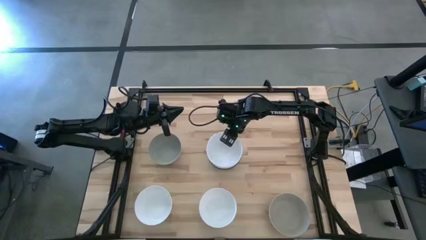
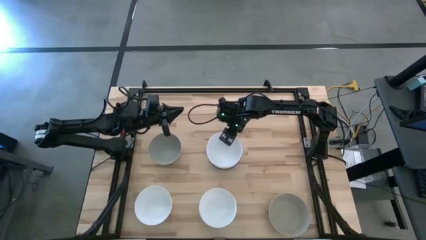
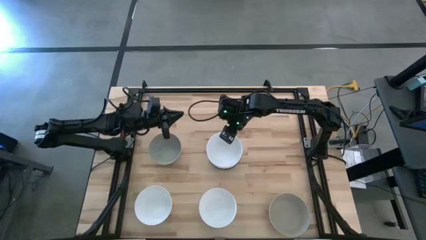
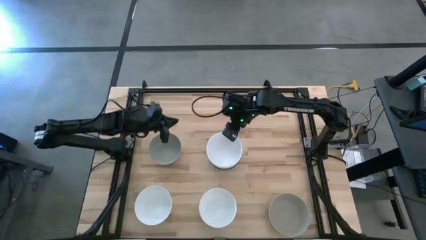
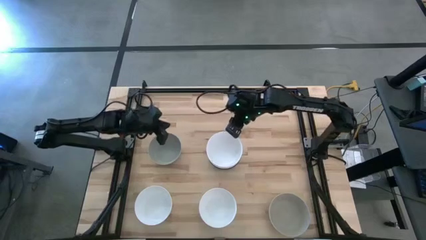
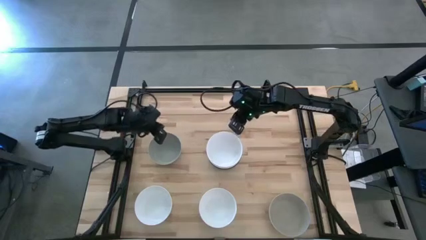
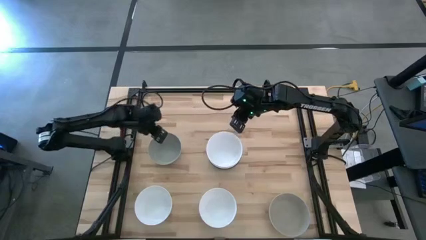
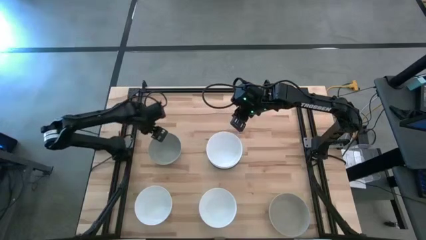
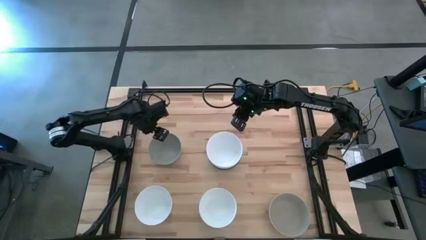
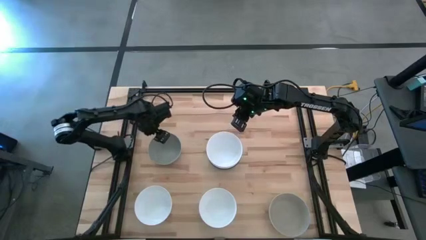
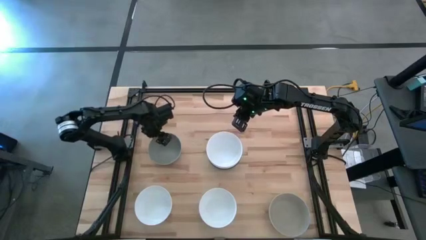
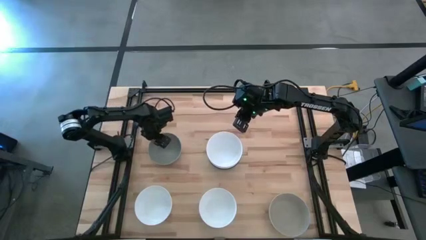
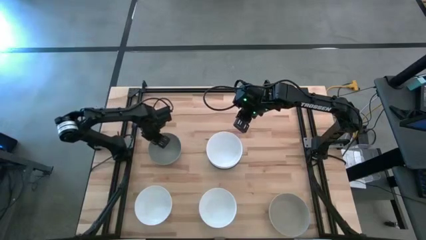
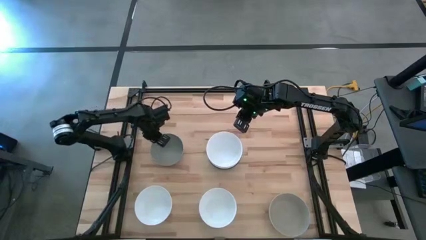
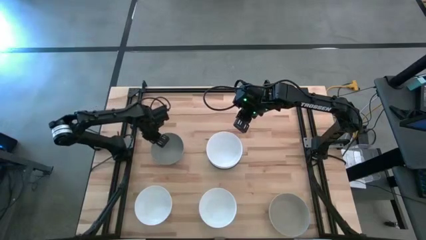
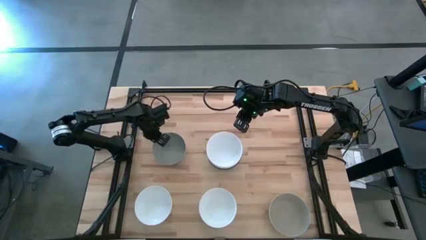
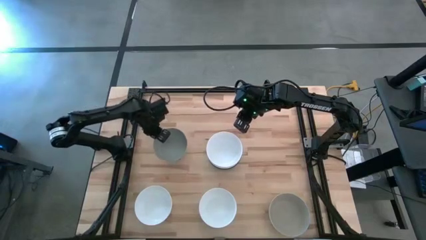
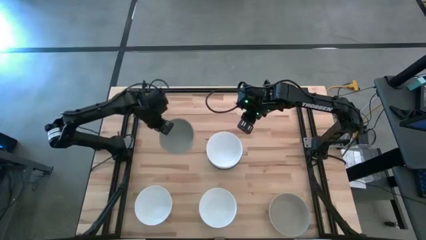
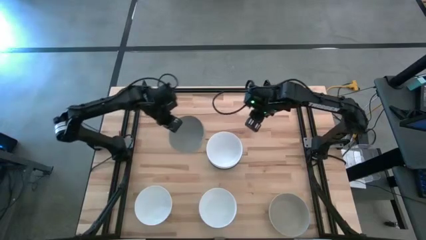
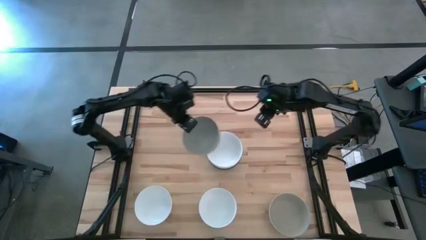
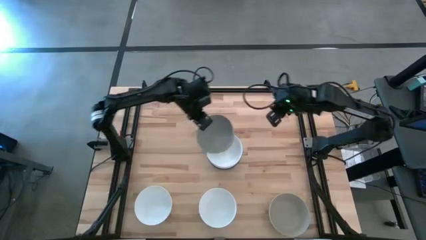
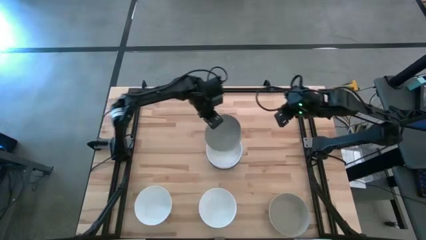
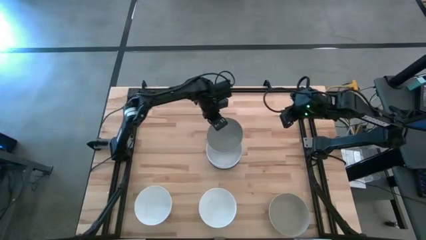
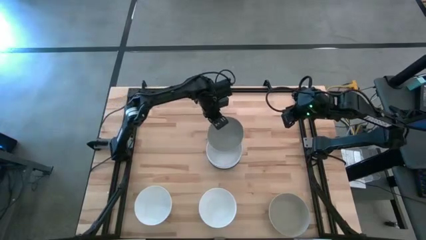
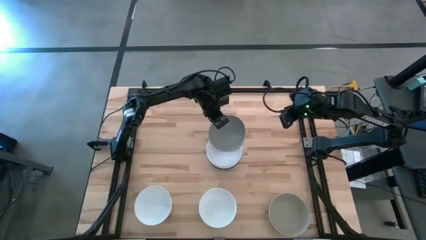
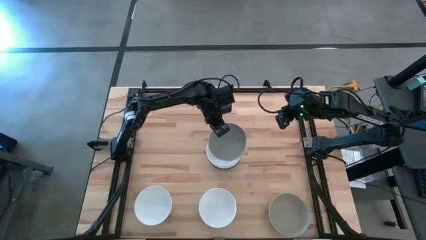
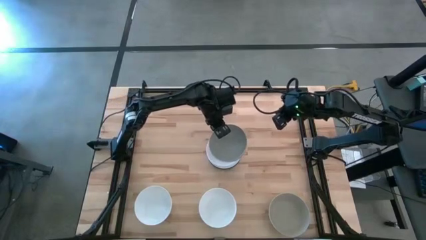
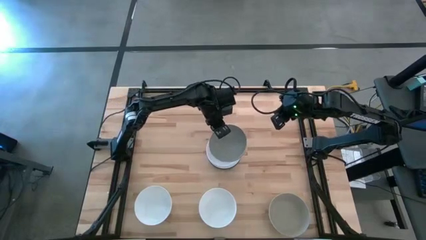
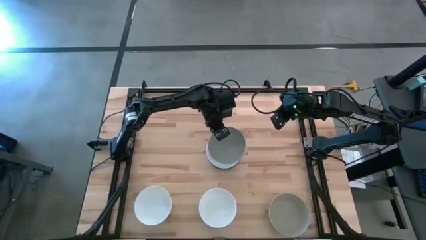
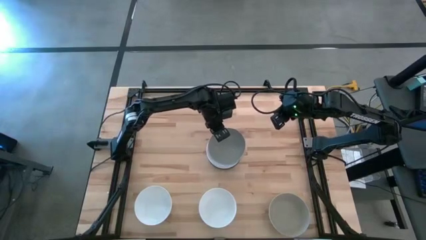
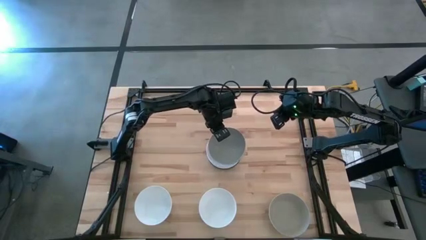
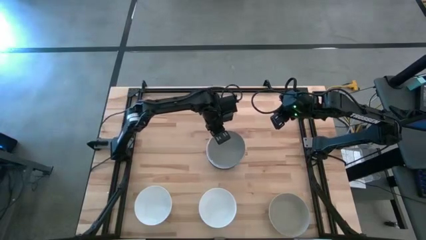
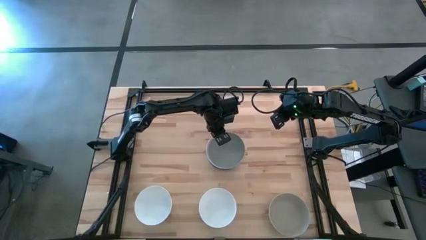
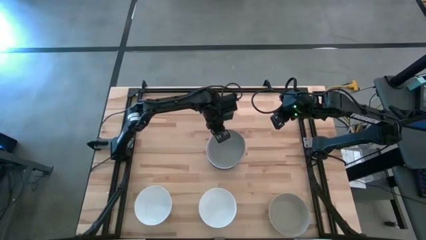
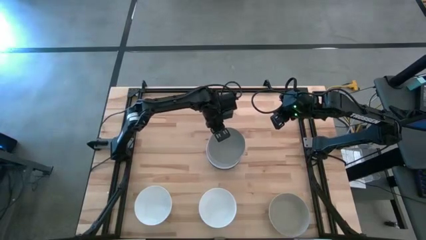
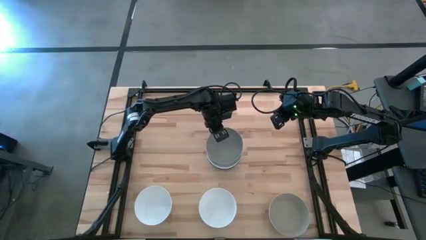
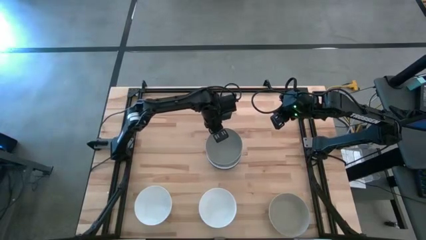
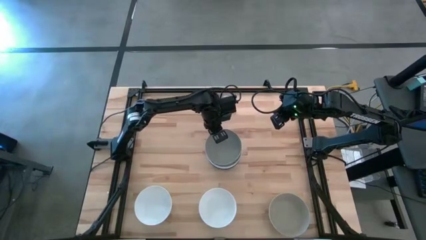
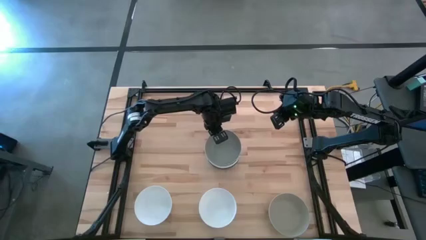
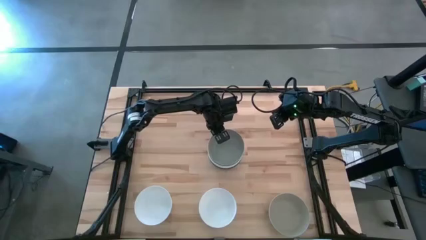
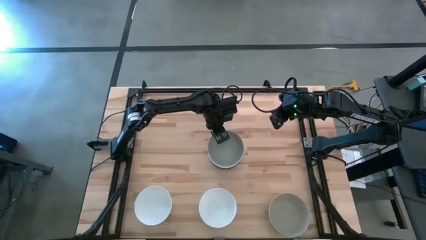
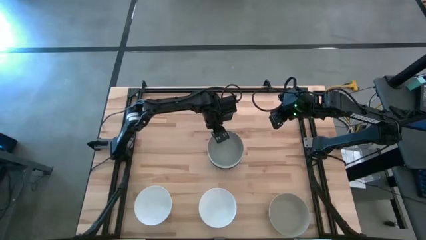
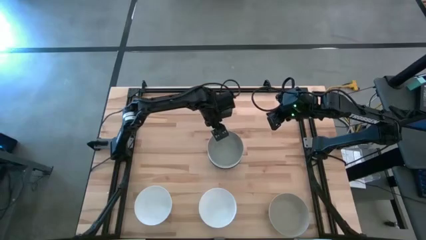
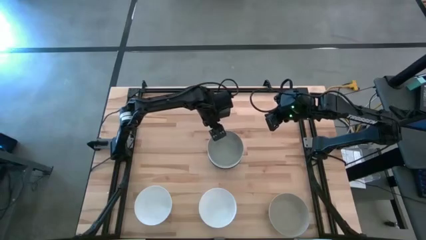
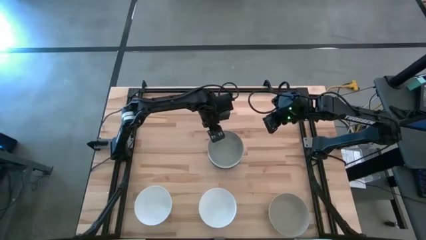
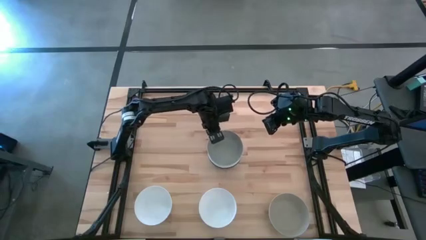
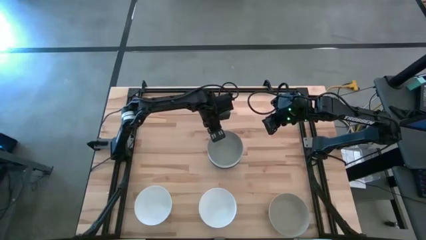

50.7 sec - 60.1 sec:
Task: Nest bowls inside each other
Stack the gray bowl on the white bowl

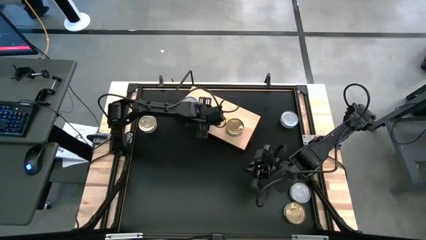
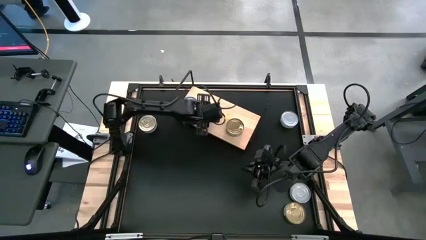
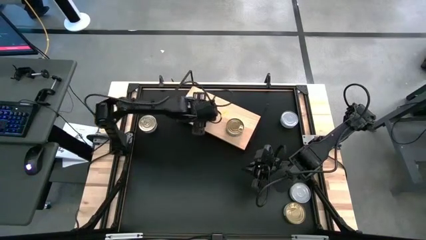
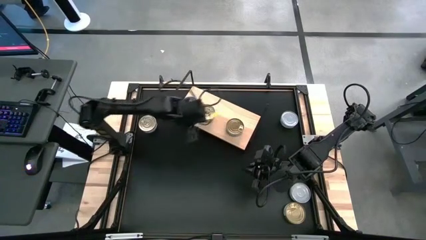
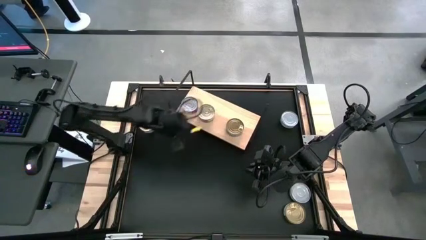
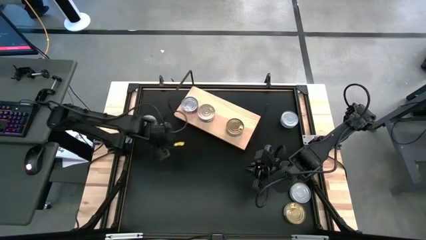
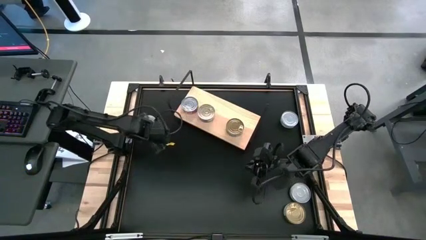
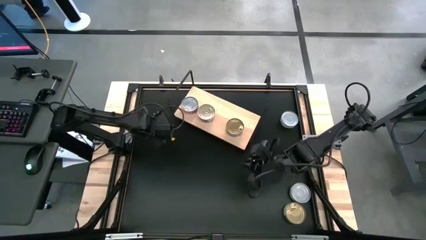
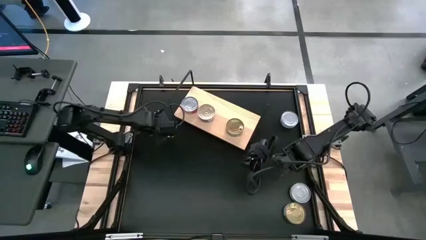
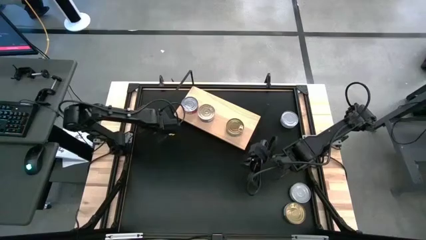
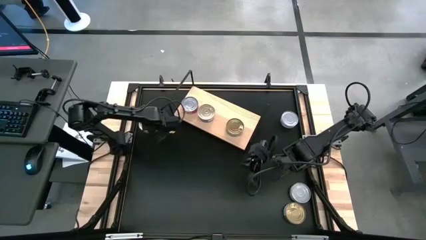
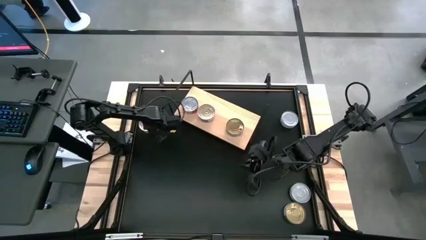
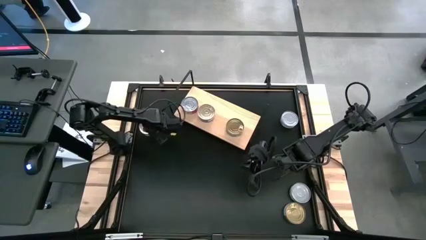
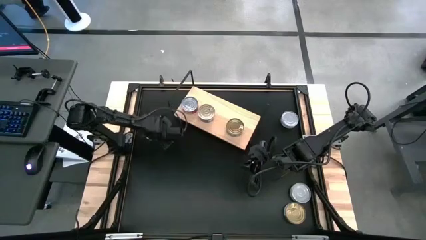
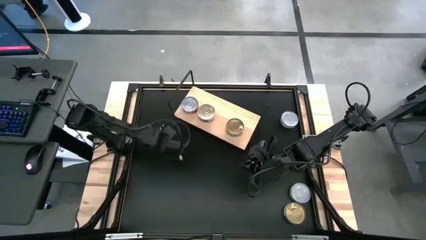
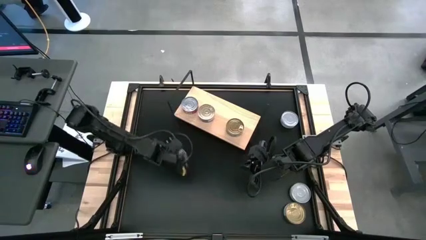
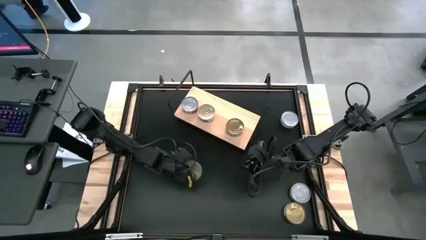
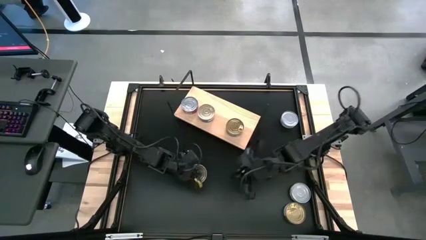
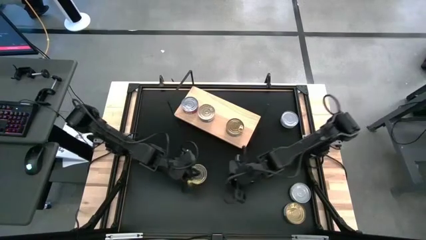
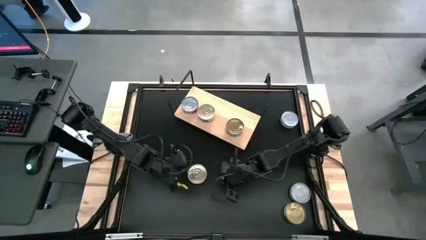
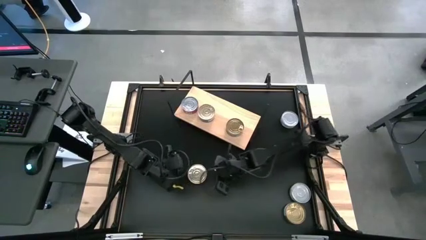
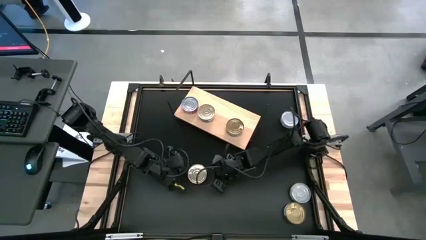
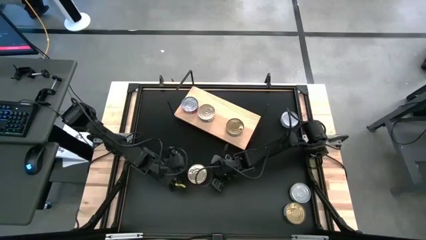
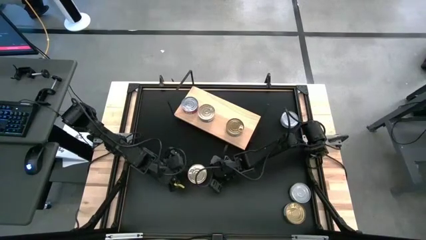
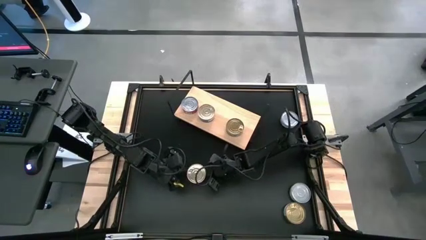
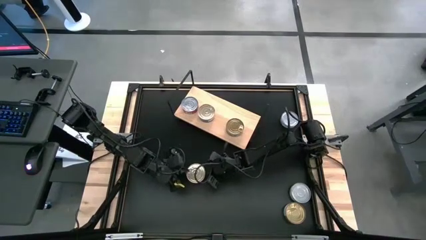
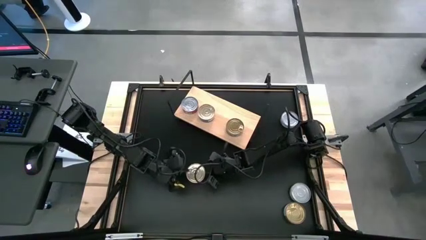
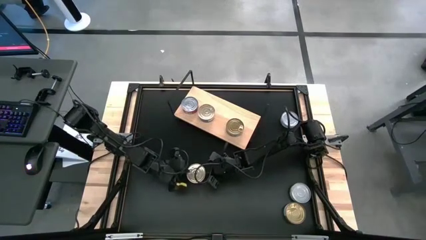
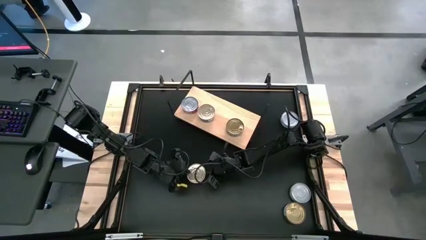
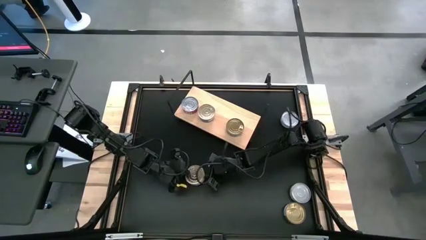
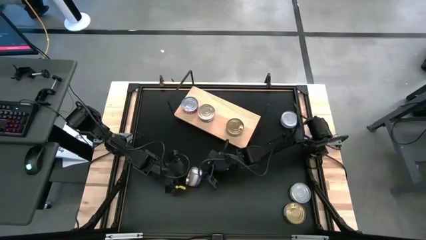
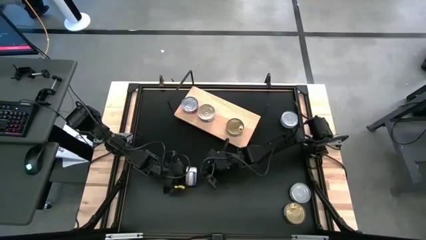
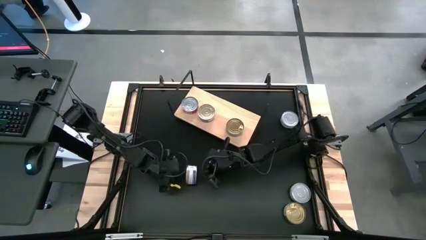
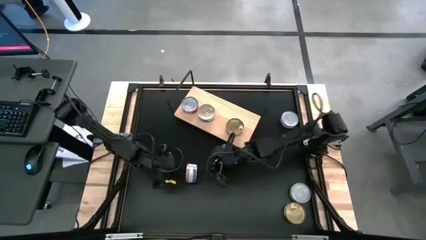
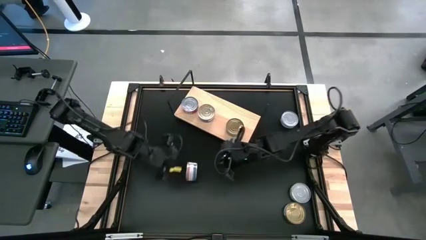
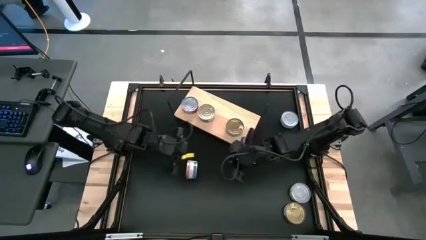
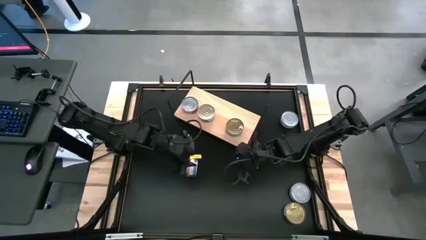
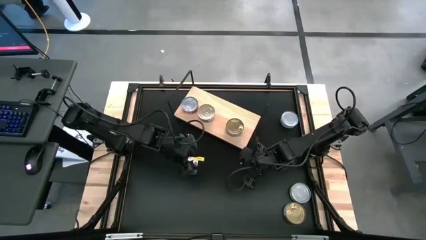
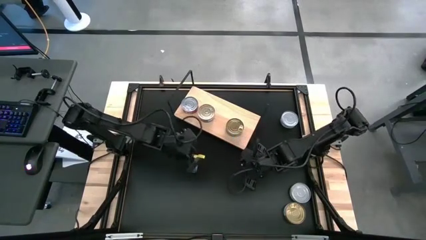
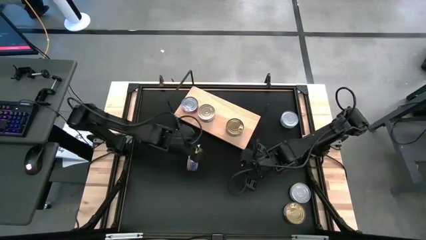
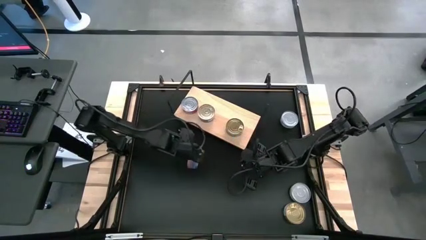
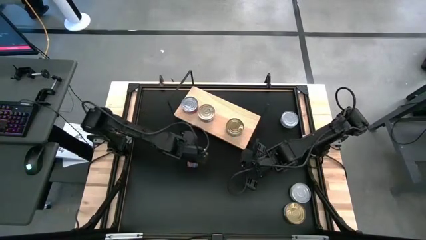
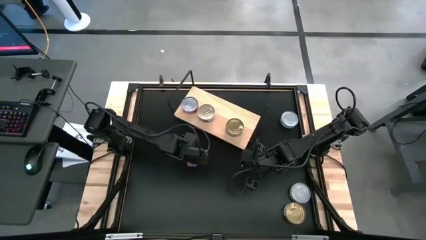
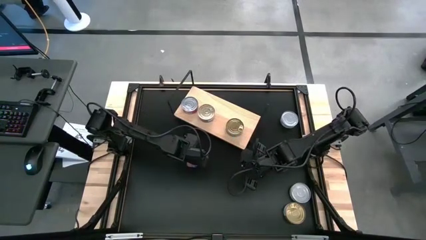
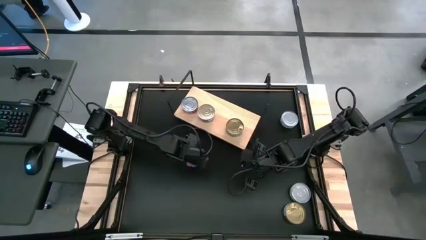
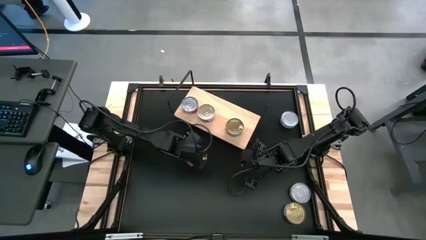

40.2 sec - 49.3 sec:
Task: Stack canned seafood by type on shelf
Stack the blue-pink tuna can on top of the blue-pink tuna can on the shelf
